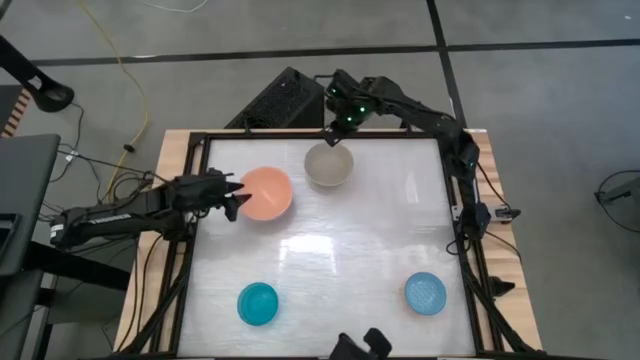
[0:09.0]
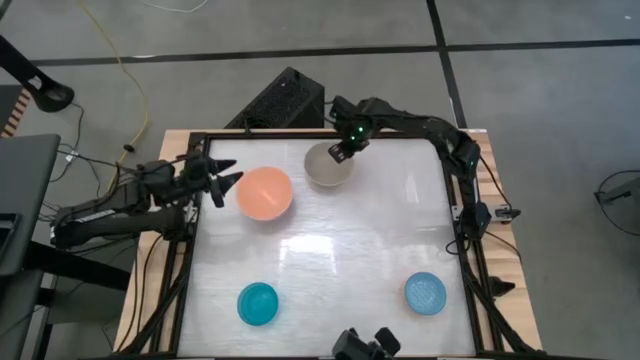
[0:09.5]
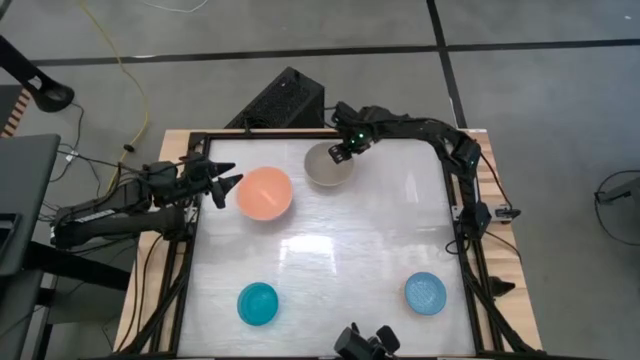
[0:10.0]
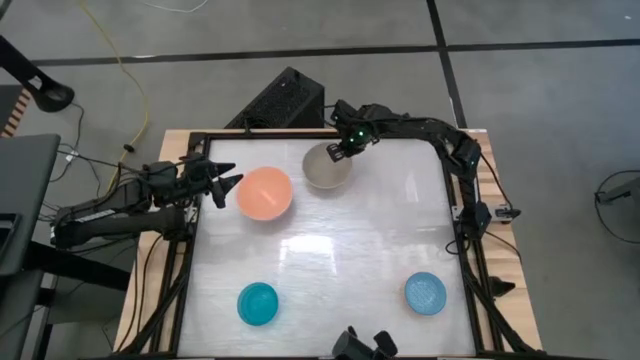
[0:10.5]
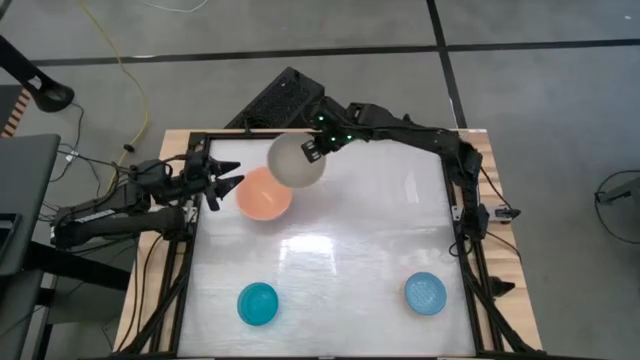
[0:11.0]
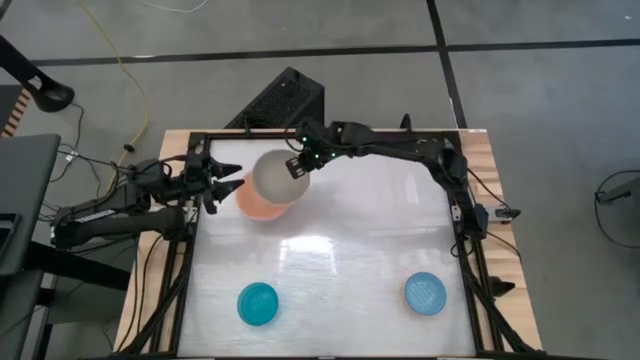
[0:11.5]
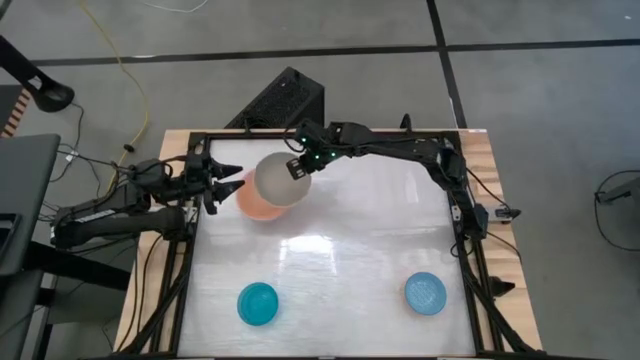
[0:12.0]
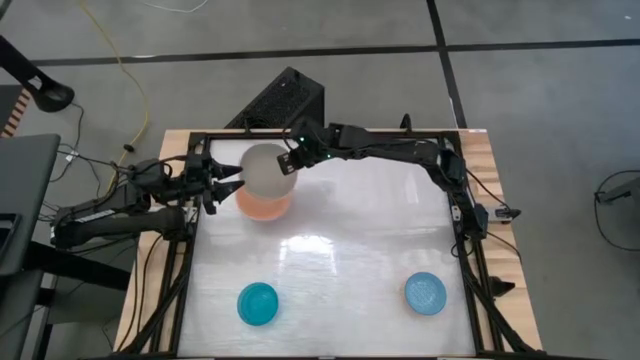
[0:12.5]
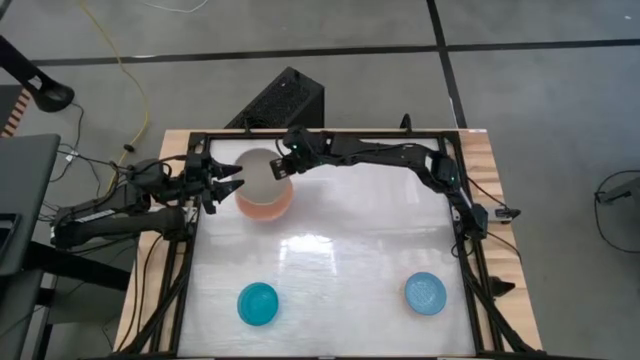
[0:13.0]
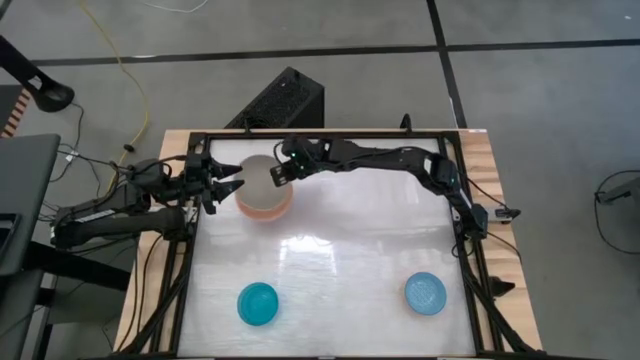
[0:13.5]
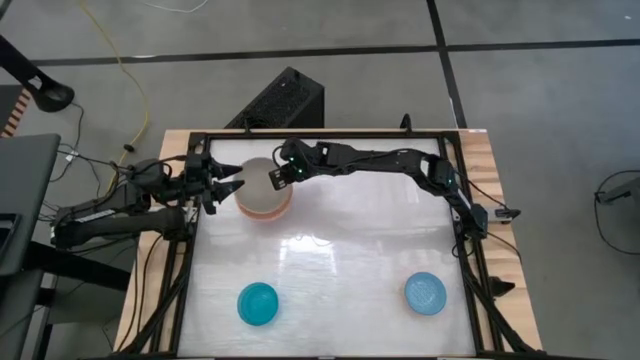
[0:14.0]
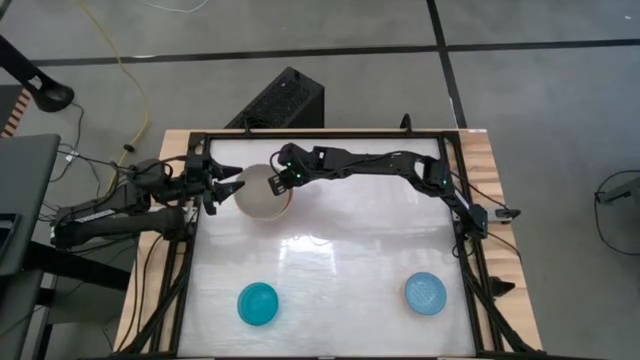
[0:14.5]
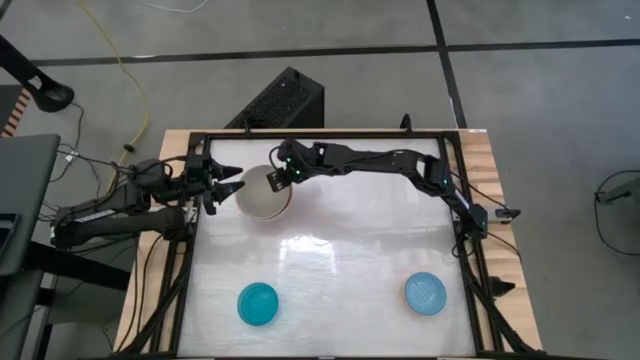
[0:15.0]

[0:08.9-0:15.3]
Stack the gray bowl on top of the light orange bowl

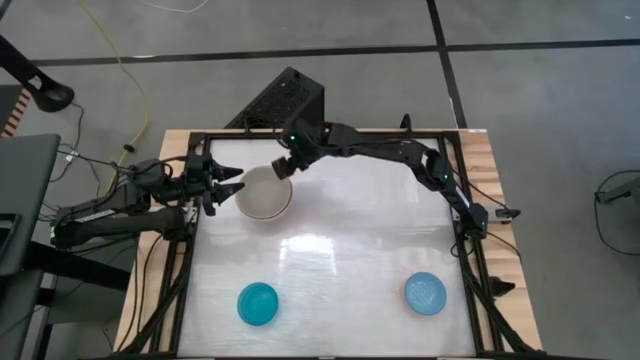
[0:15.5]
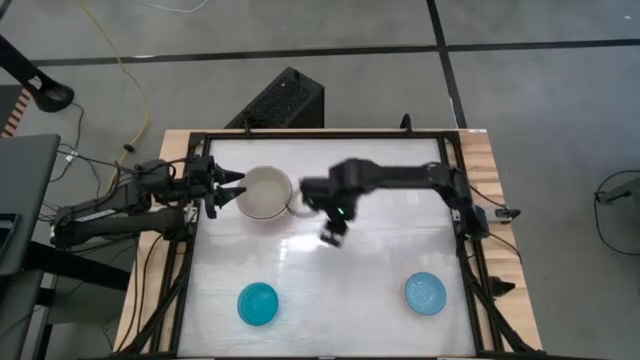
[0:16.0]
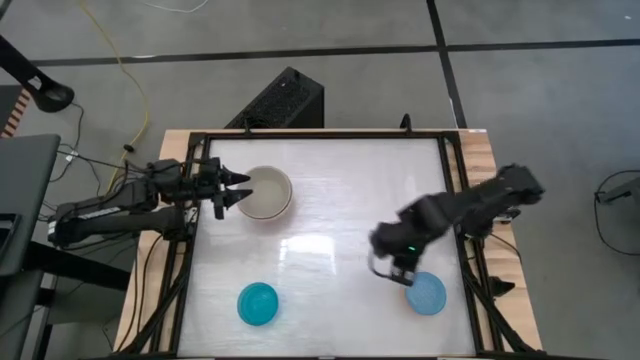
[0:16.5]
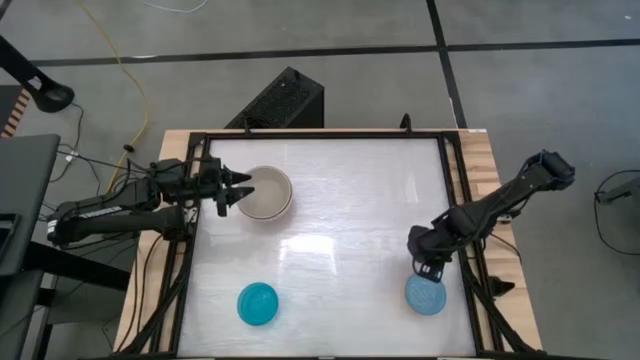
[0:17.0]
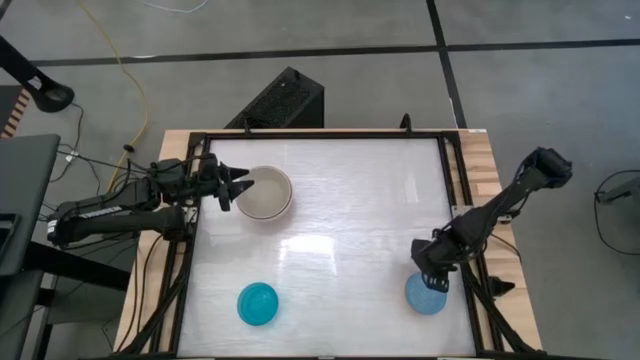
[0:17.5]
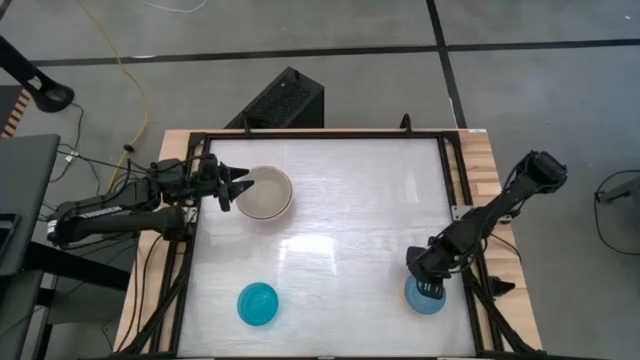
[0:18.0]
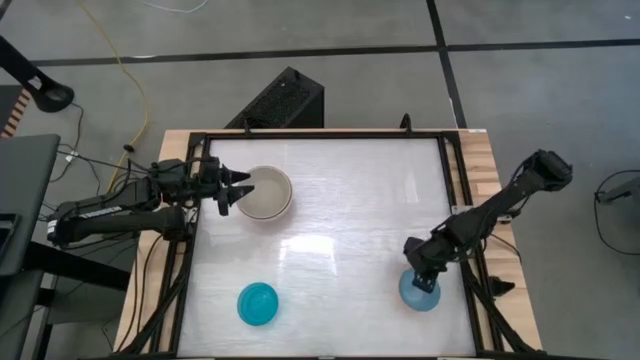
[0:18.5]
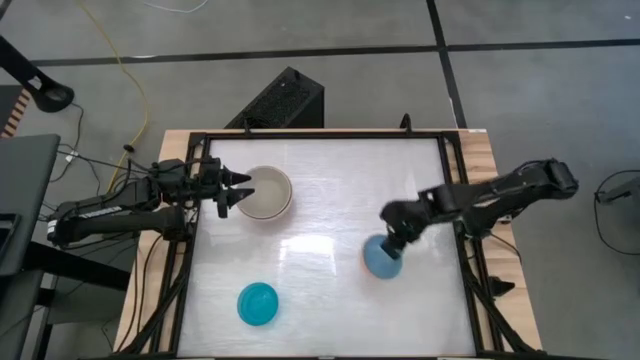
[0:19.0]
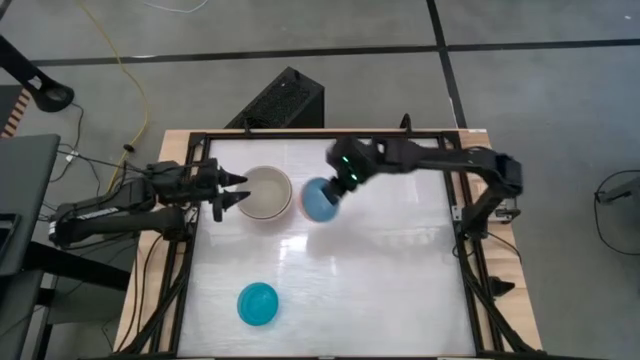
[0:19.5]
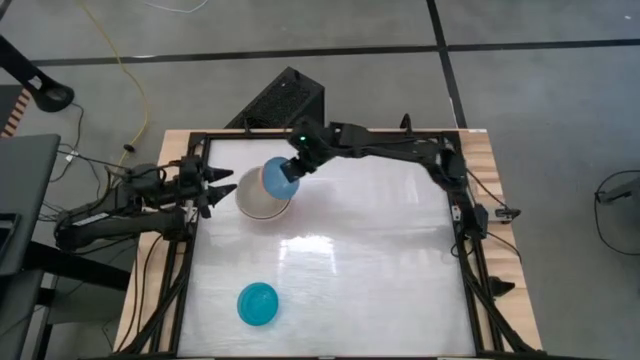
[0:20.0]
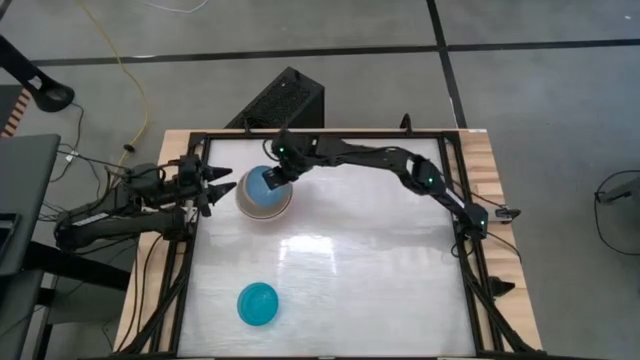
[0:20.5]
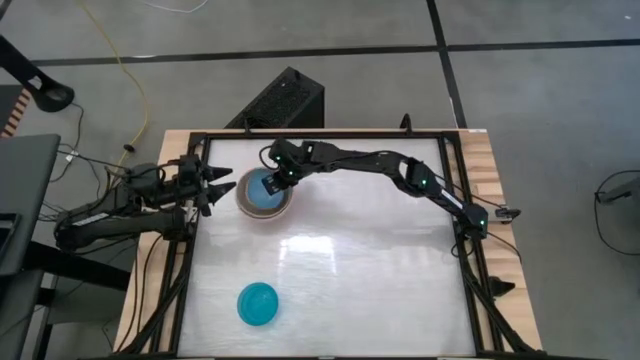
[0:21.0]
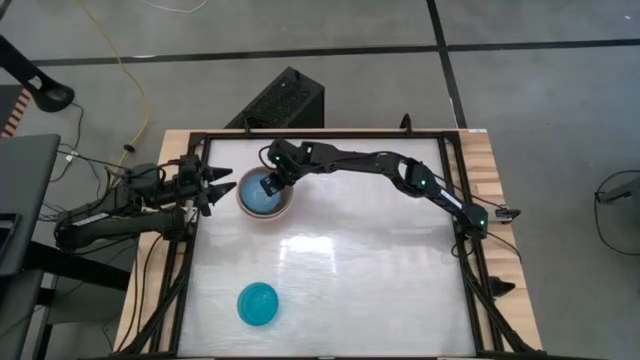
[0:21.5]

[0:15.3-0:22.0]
Stack the light blue patterned bowl on top of the gray bowl

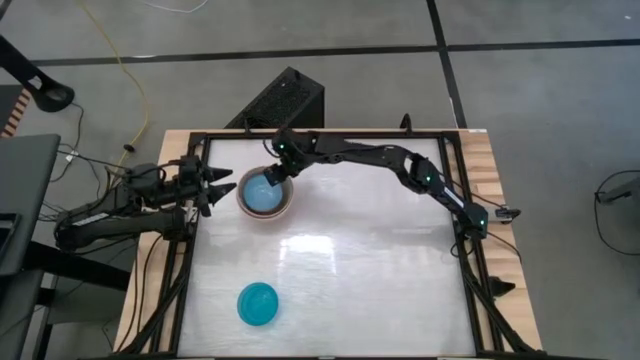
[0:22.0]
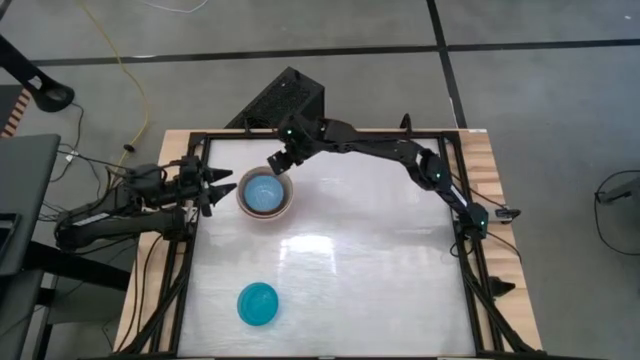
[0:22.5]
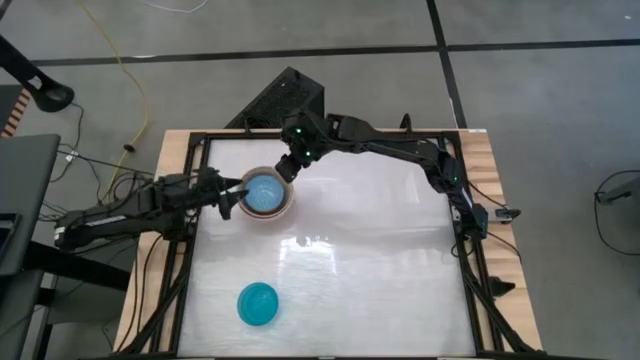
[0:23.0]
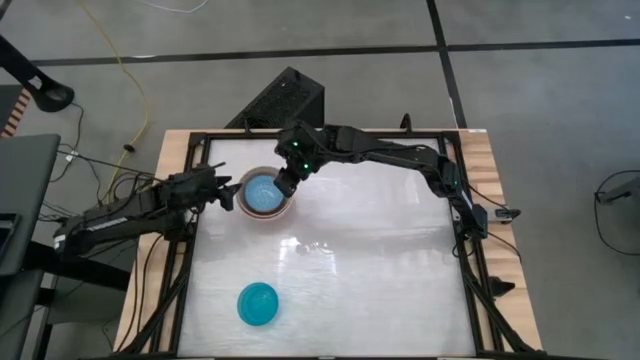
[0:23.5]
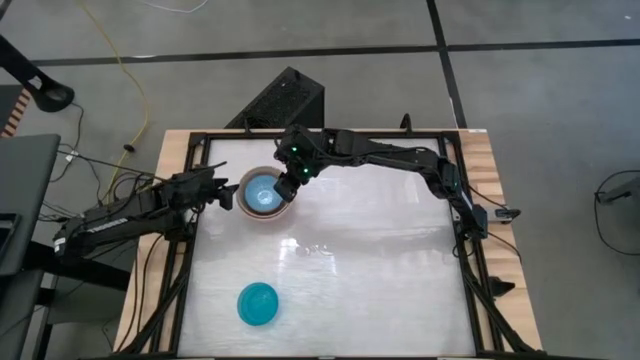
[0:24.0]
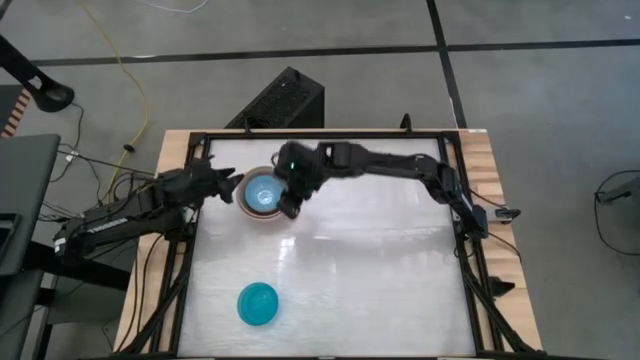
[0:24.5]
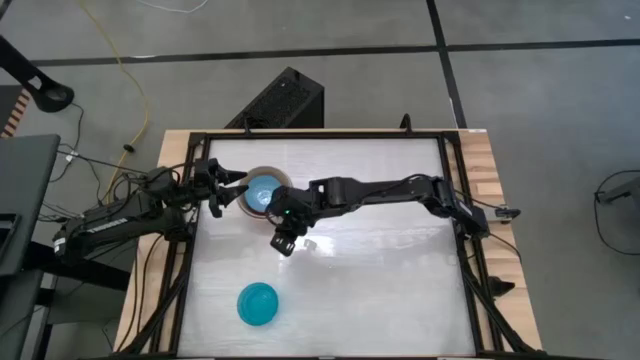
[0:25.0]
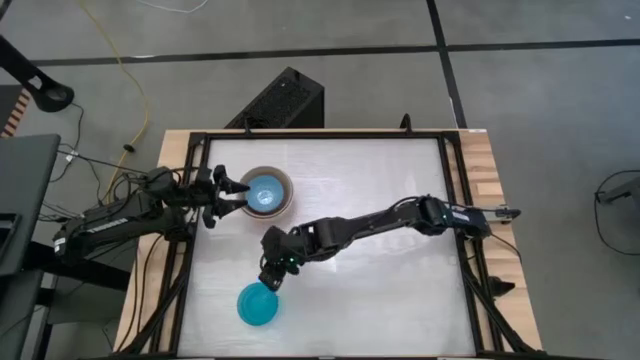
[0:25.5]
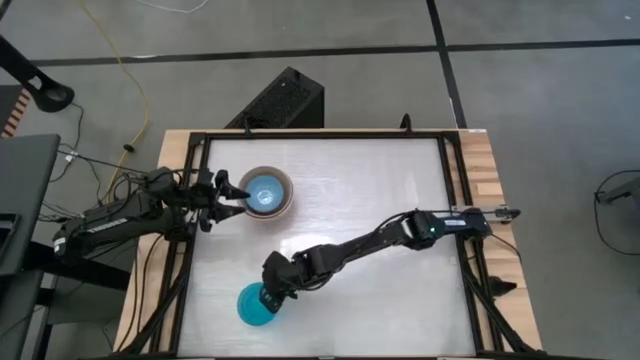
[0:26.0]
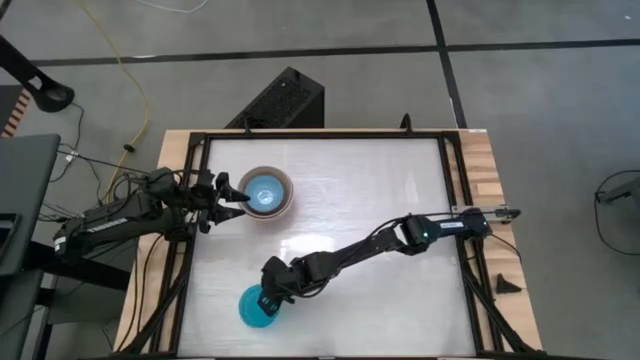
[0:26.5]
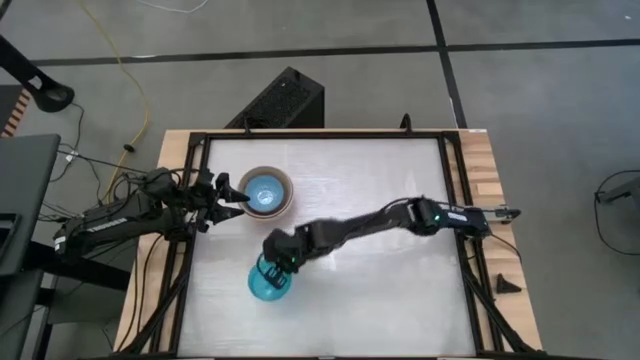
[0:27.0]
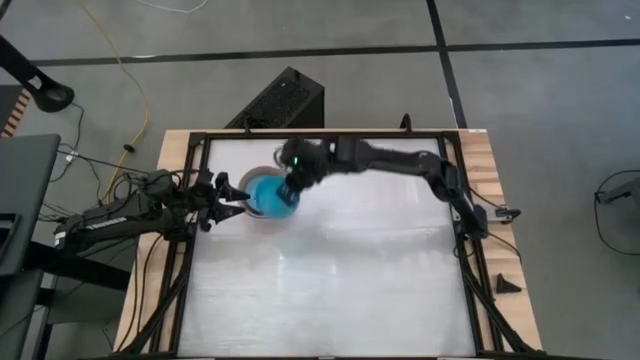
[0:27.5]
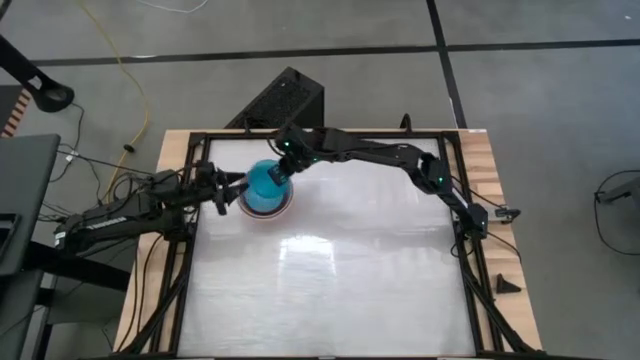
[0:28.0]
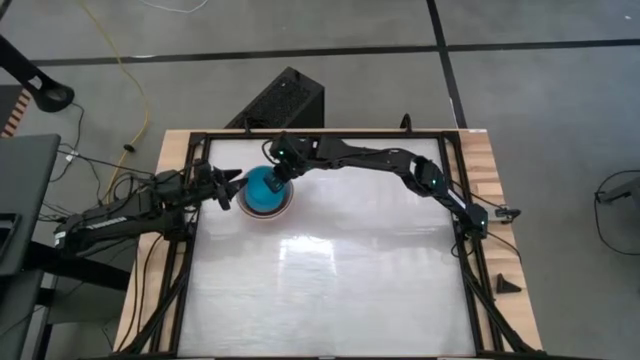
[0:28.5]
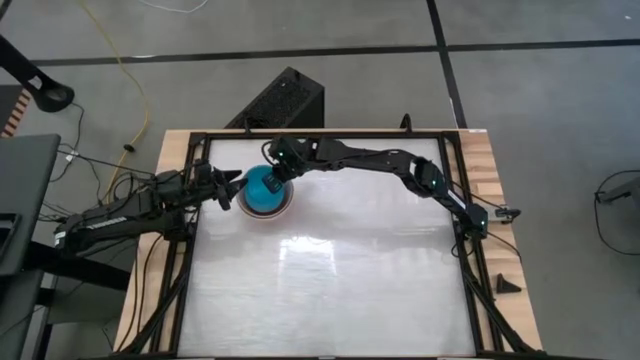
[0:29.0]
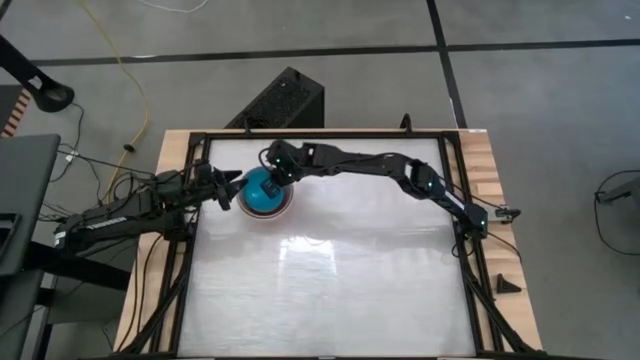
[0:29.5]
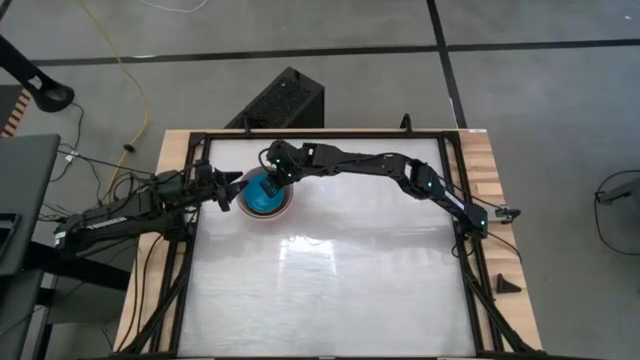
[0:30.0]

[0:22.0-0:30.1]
Stack the blue bowl on top of the light blue patterned bowl
